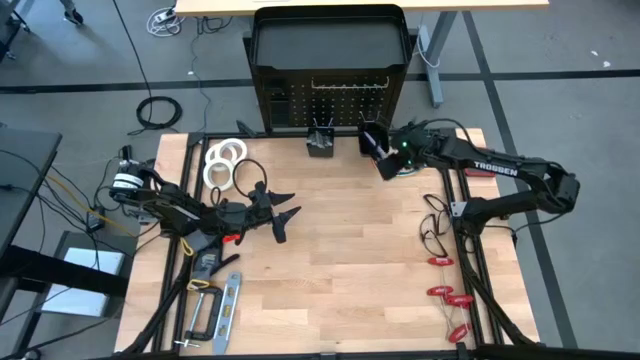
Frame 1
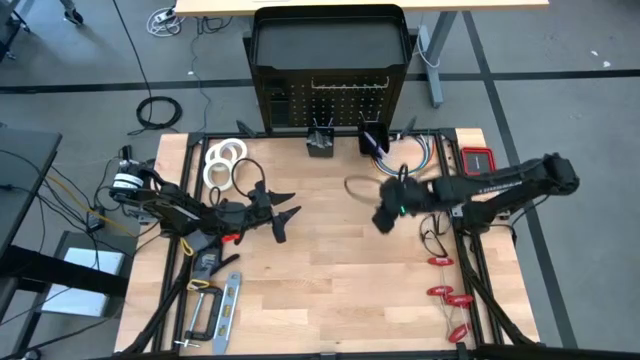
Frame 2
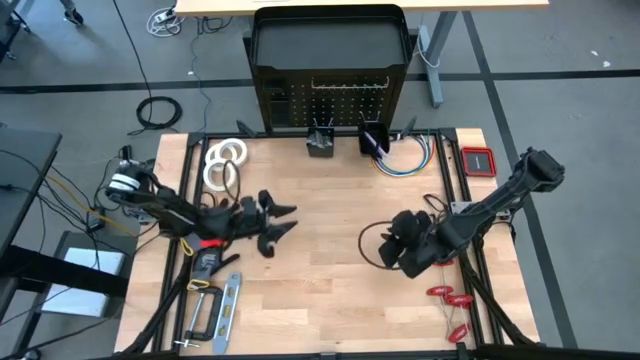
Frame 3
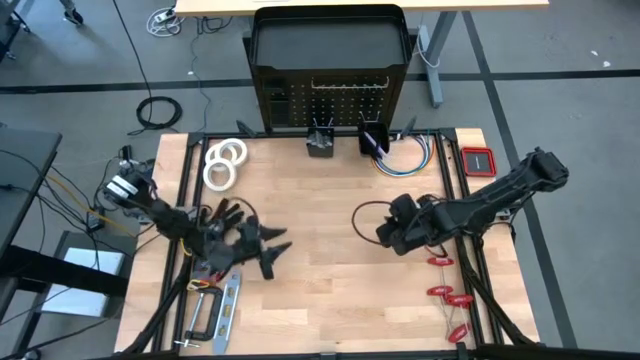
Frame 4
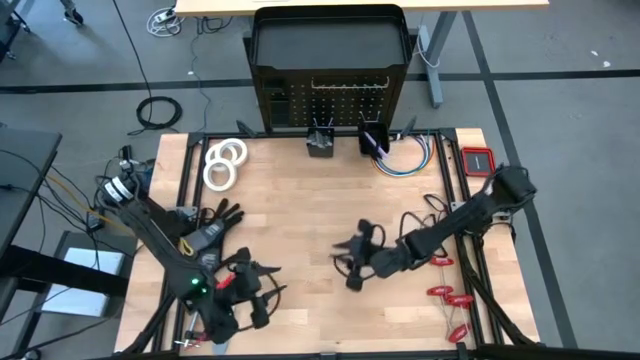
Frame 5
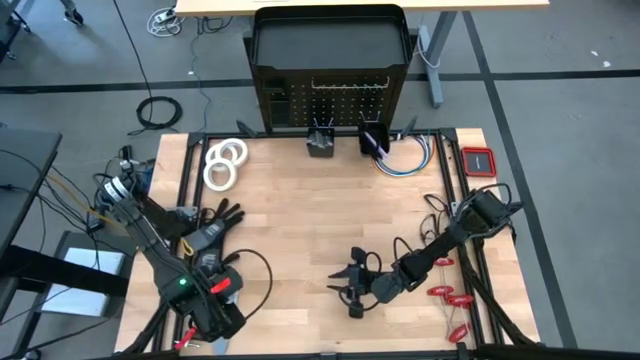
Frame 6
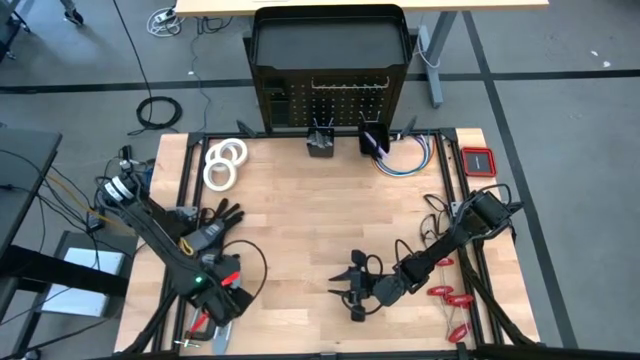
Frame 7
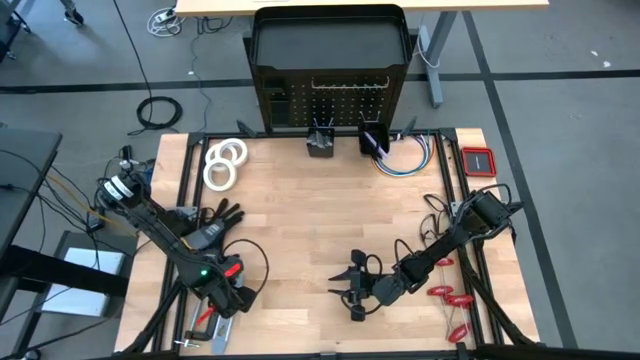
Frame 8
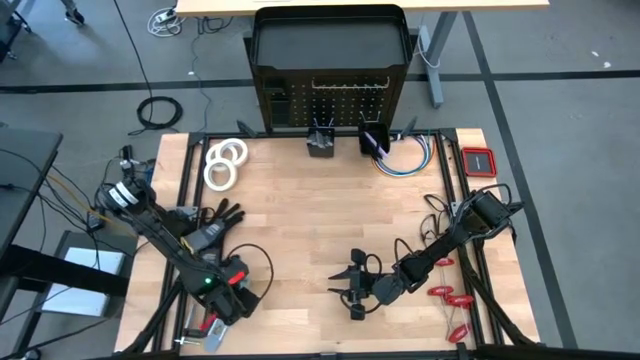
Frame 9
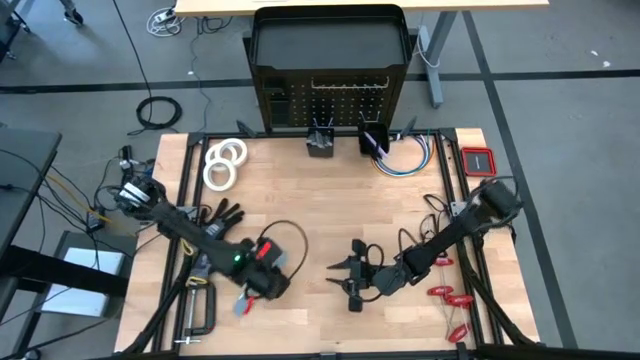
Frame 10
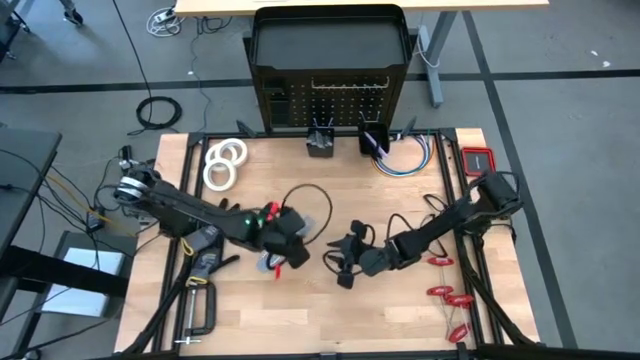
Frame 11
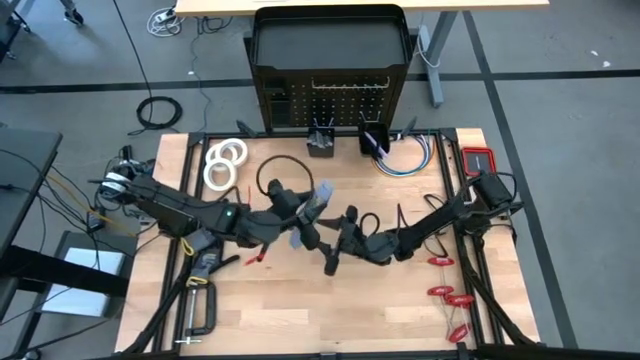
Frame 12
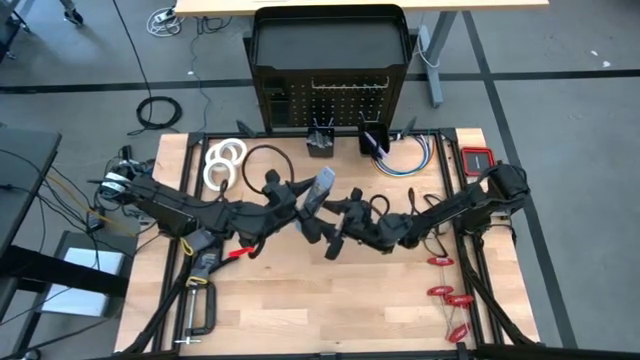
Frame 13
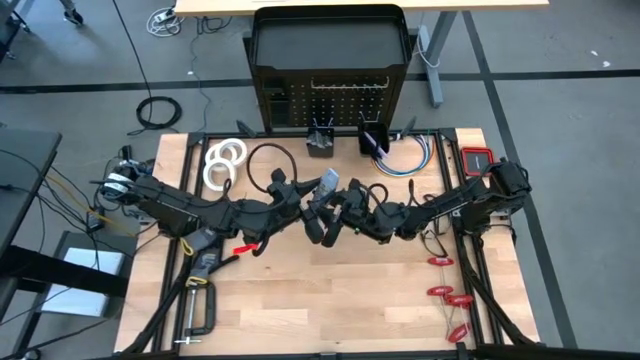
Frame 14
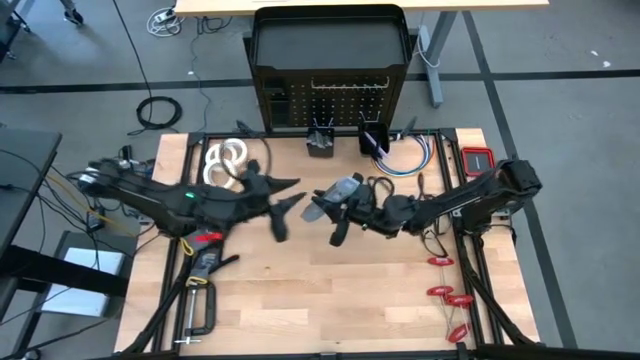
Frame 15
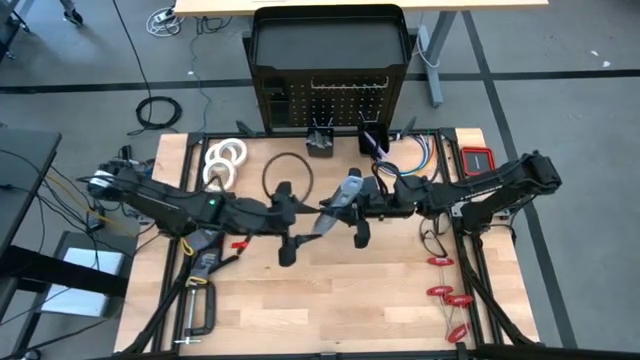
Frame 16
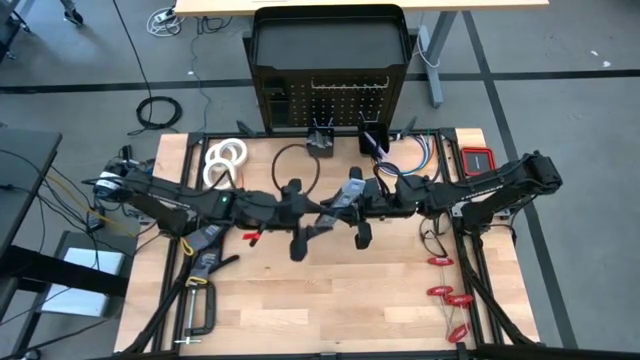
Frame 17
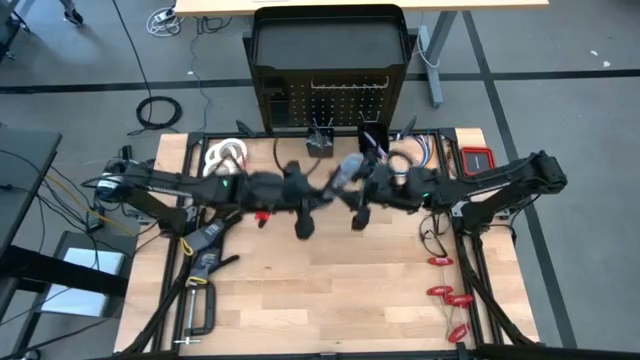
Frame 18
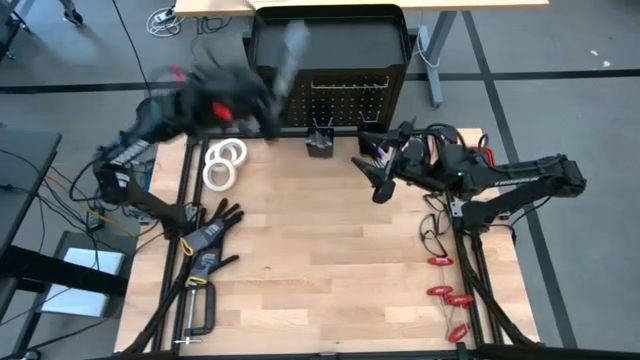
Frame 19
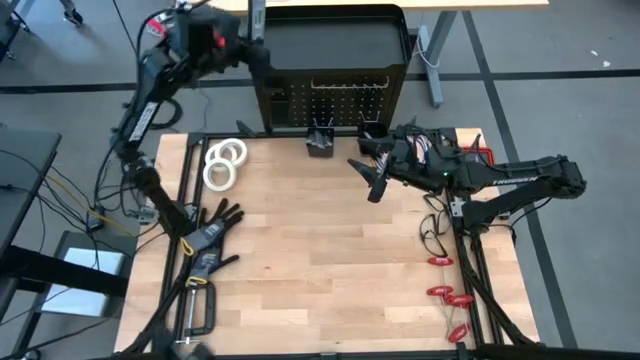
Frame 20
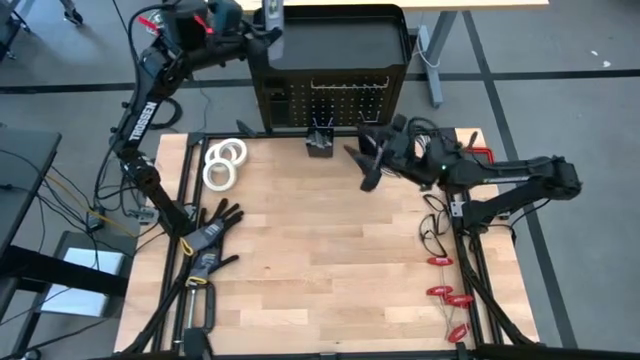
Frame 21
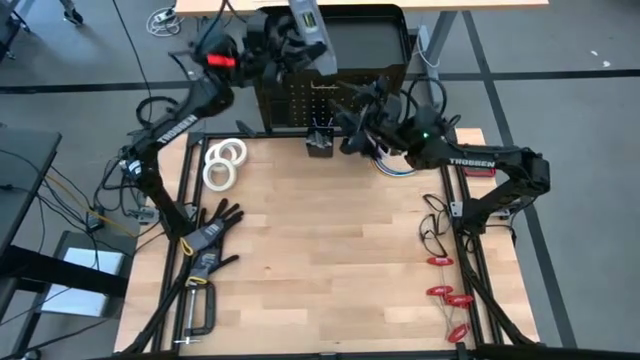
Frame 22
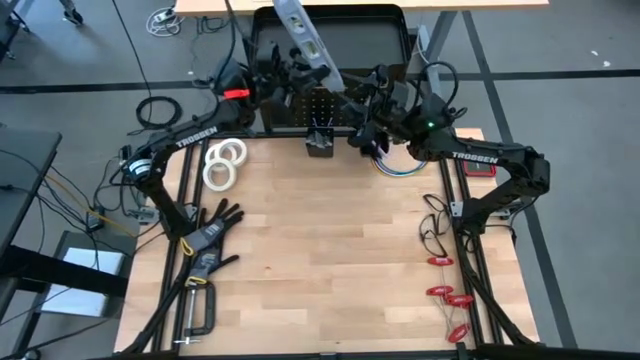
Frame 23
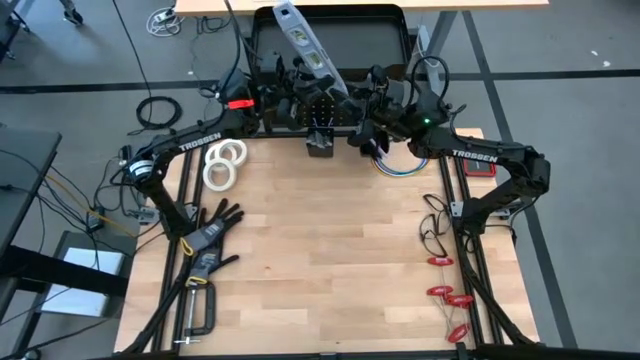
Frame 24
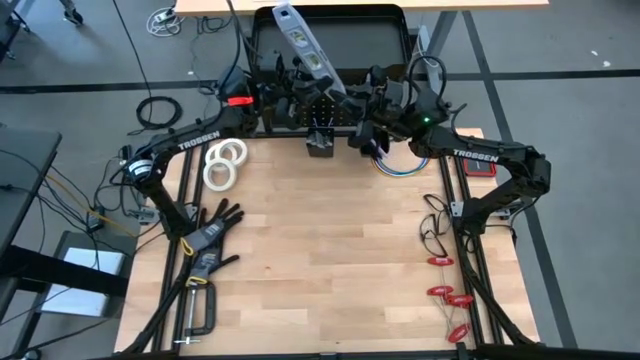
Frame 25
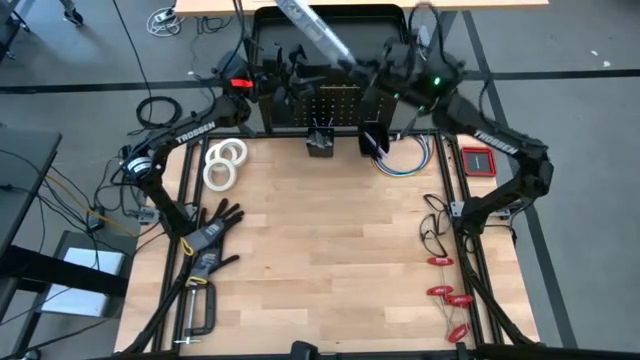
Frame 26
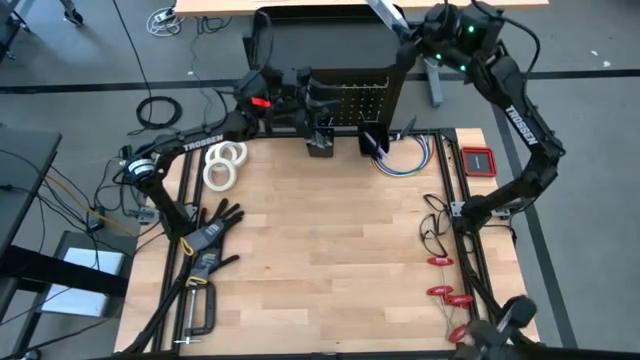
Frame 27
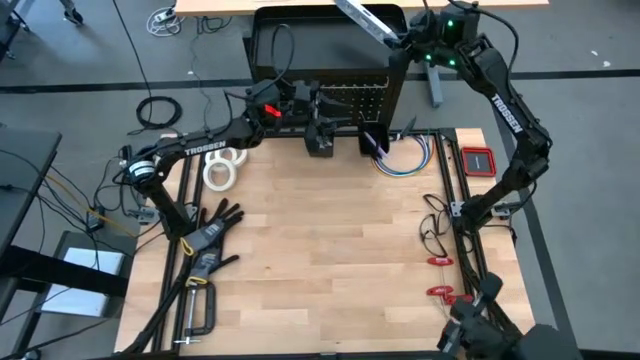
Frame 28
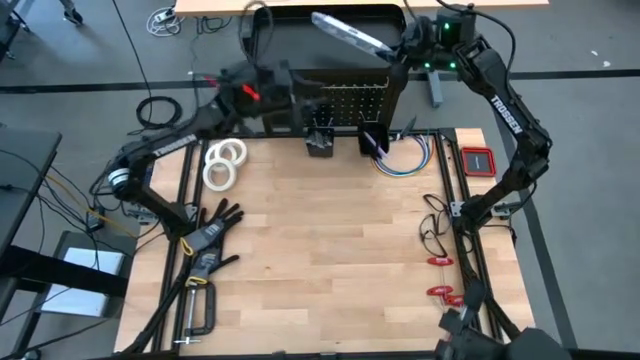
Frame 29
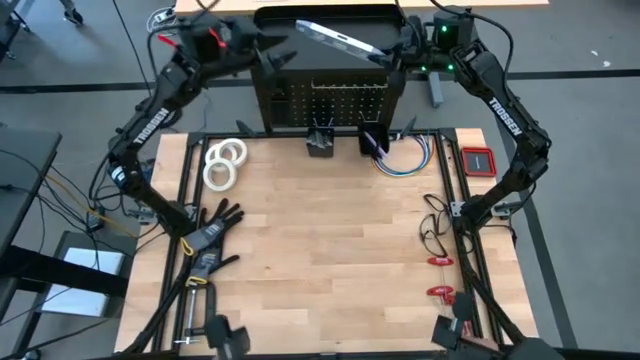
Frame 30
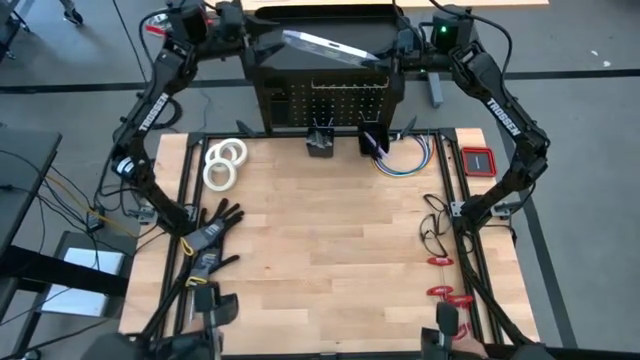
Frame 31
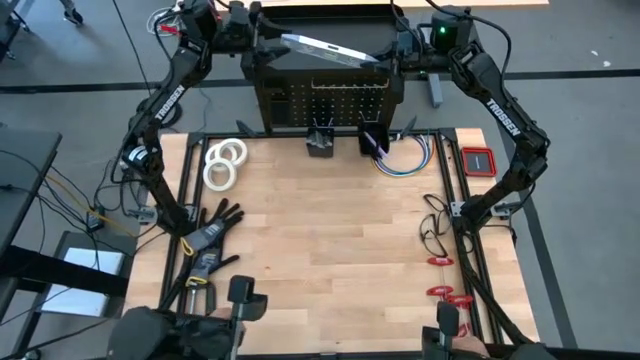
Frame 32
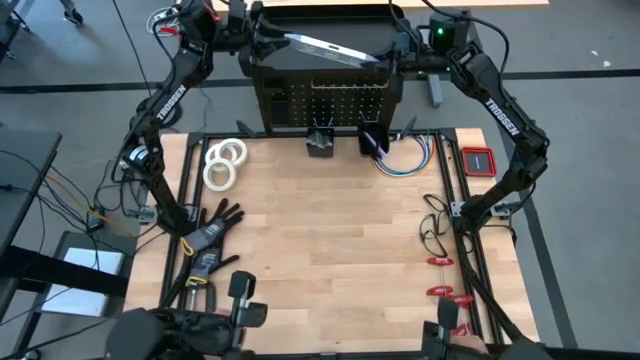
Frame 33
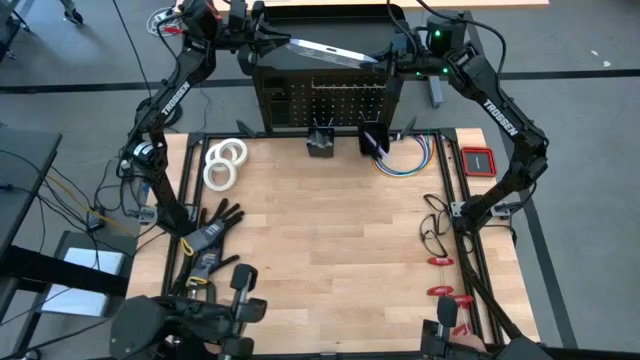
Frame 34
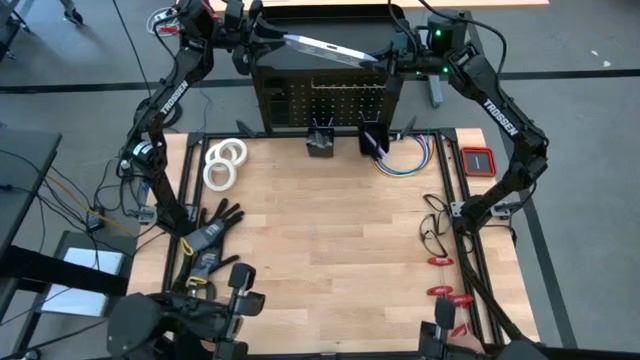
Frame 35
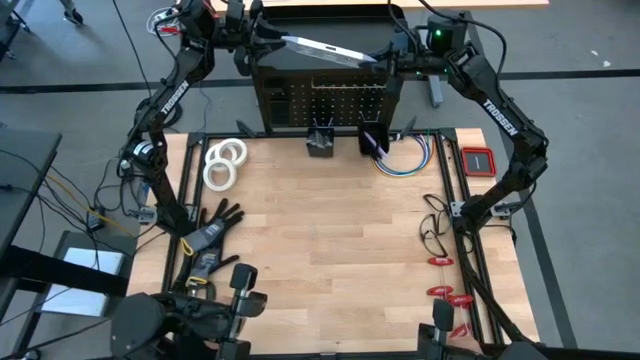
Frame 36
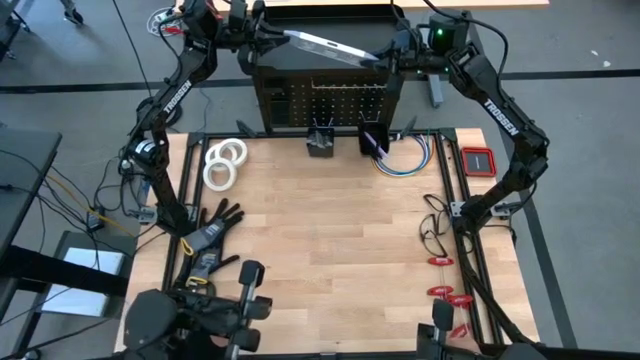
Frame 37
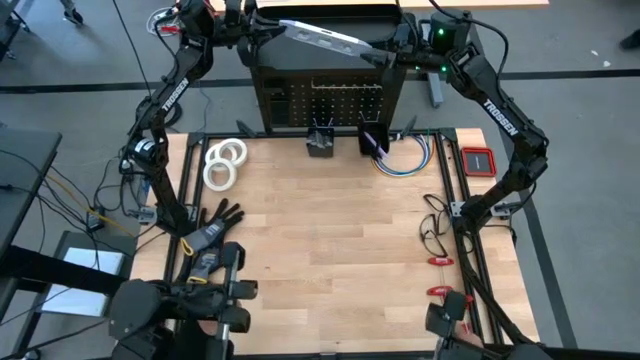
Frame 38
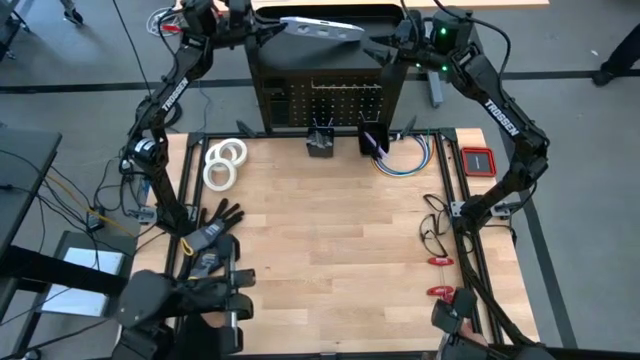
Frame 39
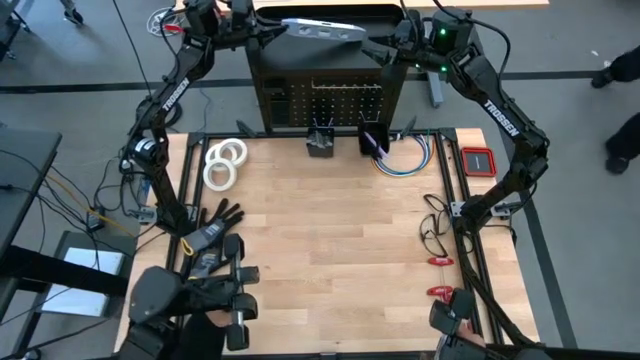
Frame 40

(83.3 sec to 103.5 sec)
Task: Hang tools onto peg board
Put the spirit level on the peg board

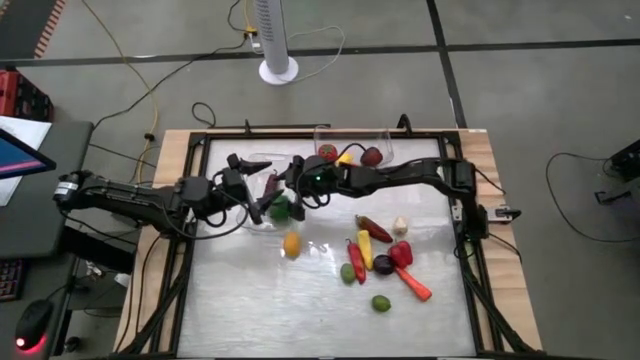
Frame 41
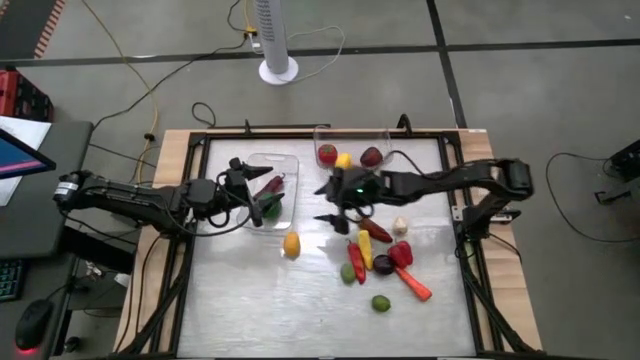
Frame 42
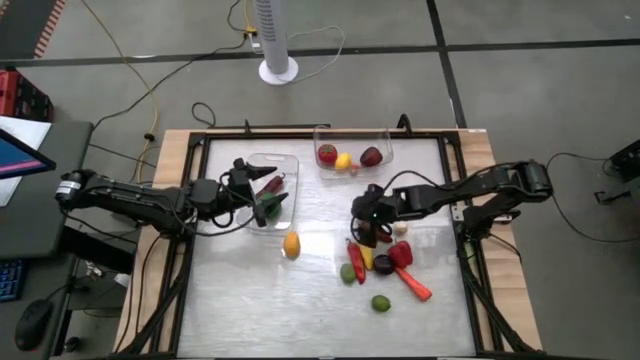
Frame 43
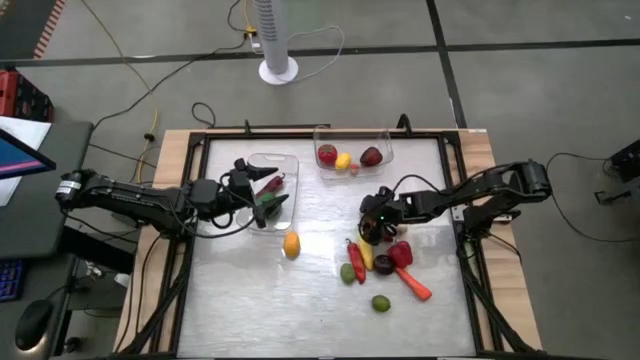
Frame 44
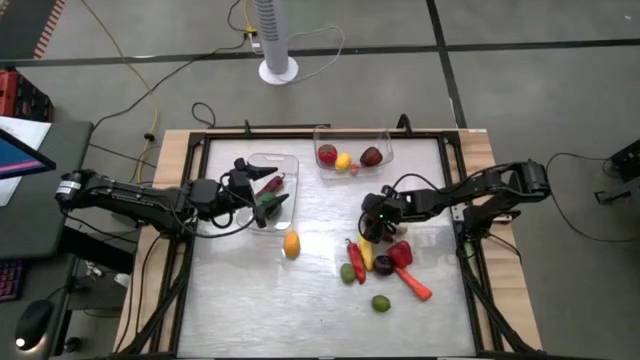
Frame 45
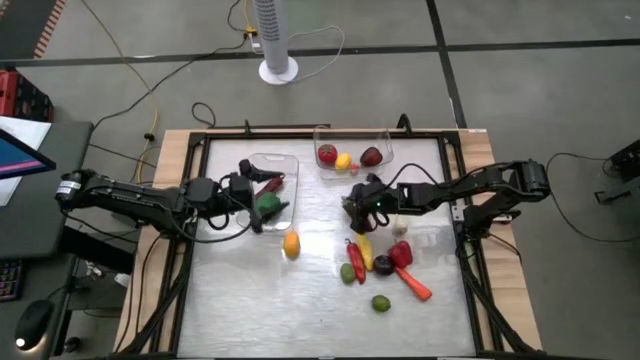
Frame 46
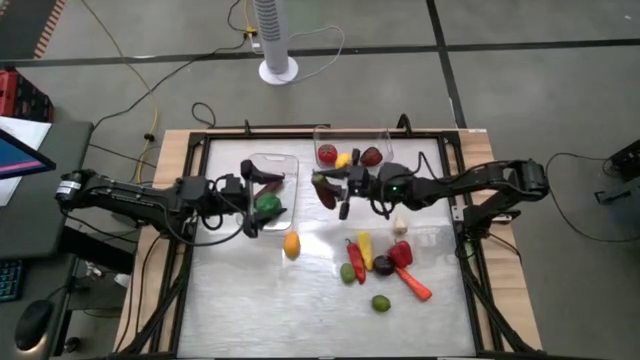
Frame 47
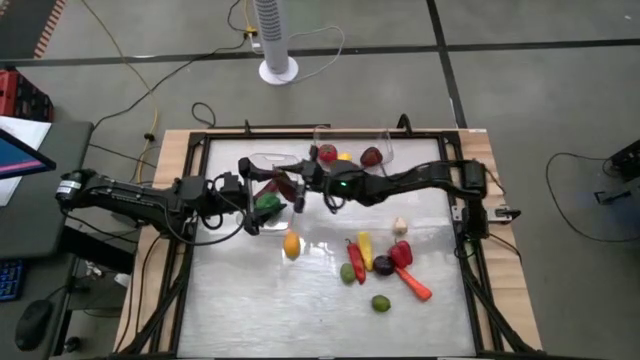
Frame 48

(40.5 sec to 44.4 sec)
Task: Sort produce into baskets
Put the top red chili pepper into the left transparent bin
